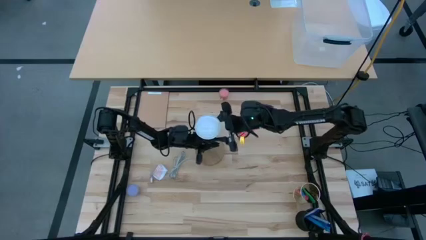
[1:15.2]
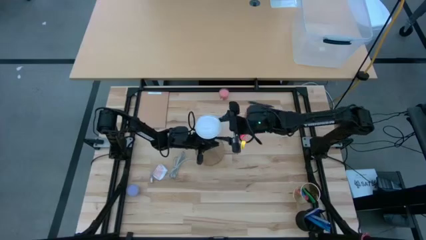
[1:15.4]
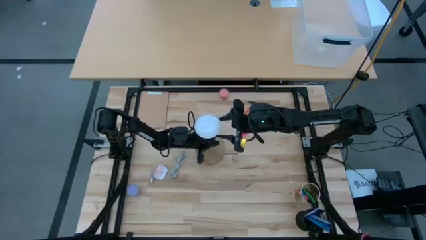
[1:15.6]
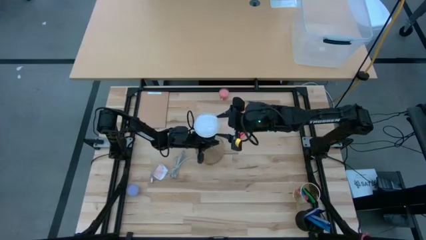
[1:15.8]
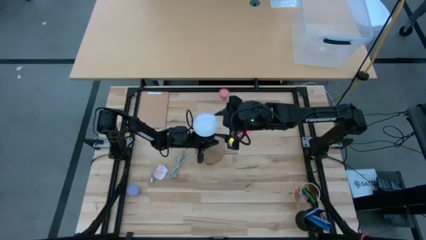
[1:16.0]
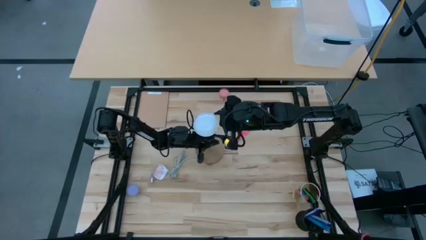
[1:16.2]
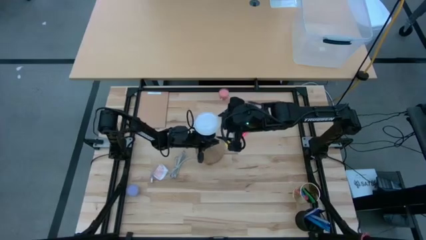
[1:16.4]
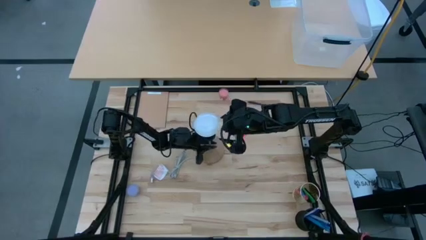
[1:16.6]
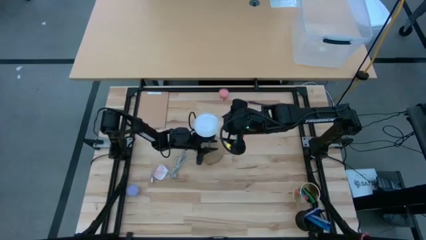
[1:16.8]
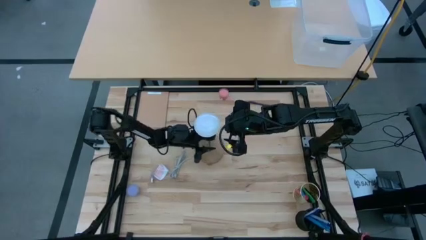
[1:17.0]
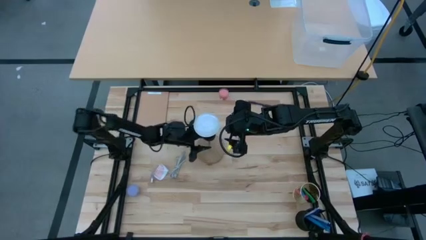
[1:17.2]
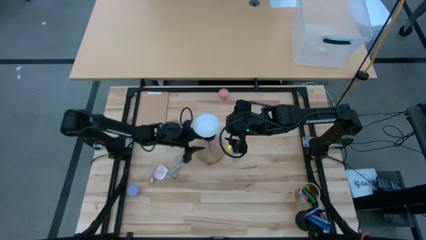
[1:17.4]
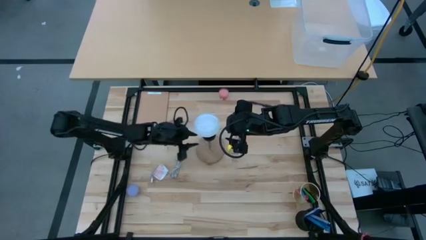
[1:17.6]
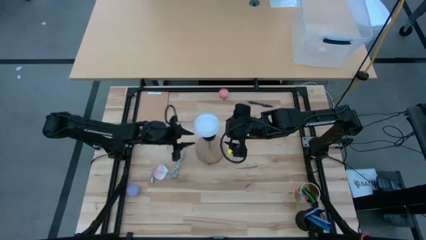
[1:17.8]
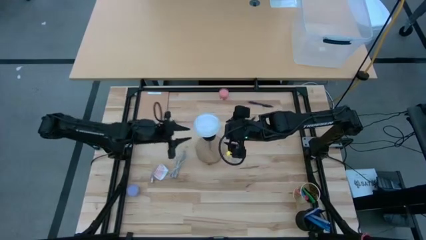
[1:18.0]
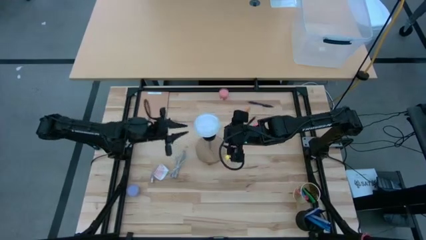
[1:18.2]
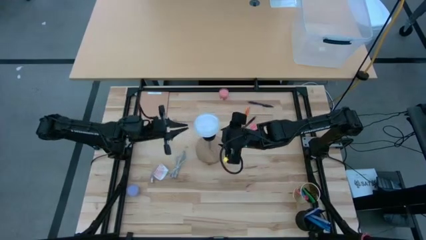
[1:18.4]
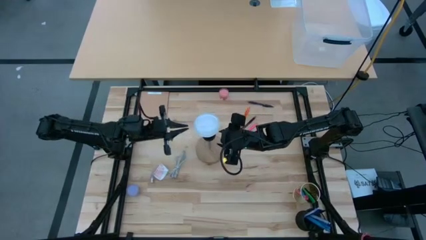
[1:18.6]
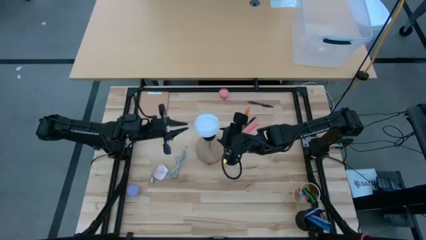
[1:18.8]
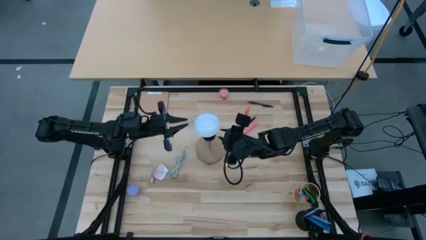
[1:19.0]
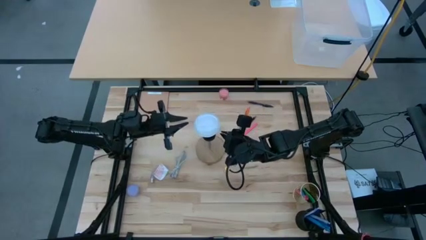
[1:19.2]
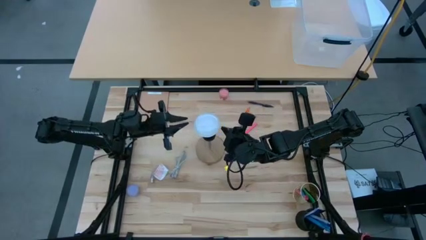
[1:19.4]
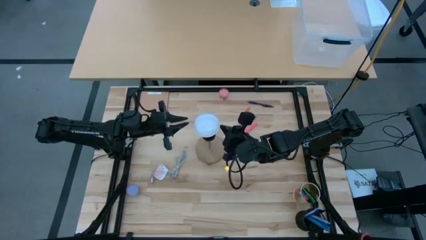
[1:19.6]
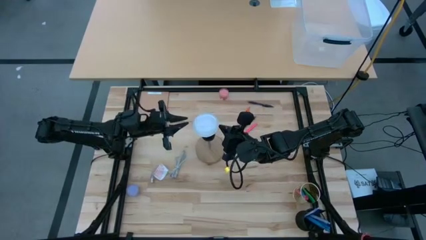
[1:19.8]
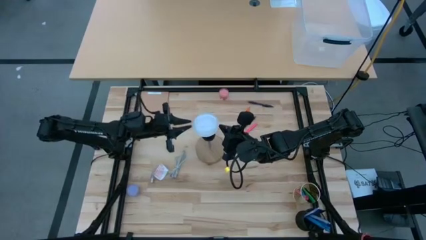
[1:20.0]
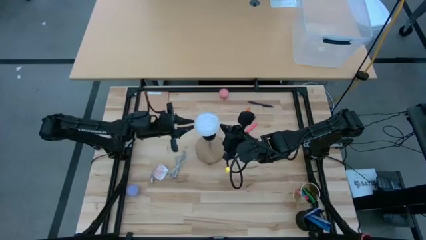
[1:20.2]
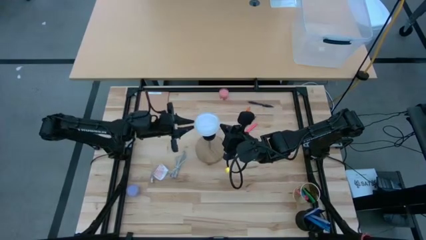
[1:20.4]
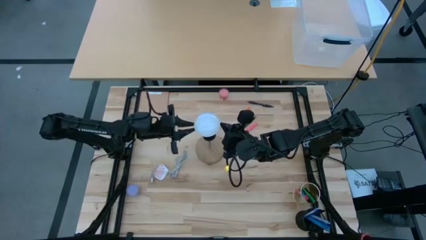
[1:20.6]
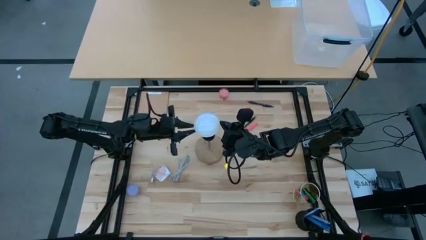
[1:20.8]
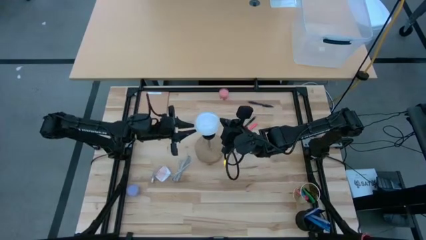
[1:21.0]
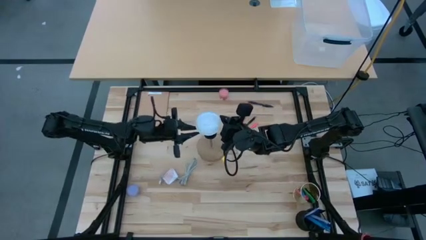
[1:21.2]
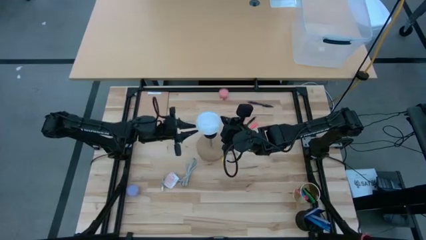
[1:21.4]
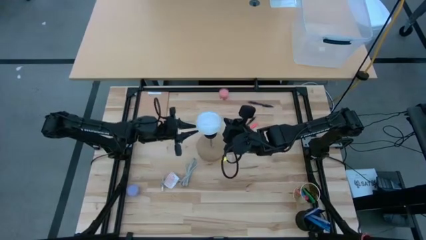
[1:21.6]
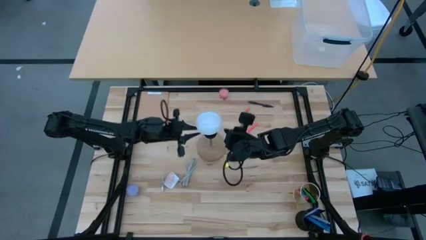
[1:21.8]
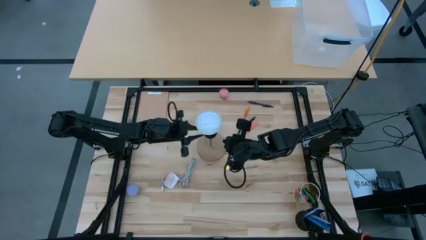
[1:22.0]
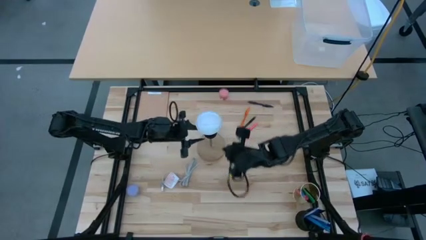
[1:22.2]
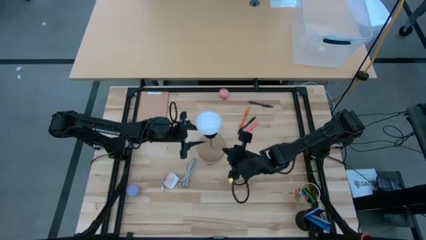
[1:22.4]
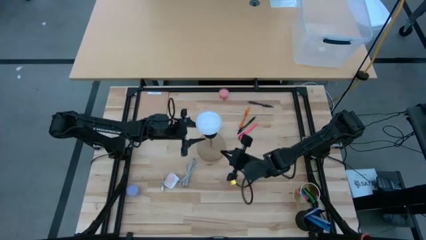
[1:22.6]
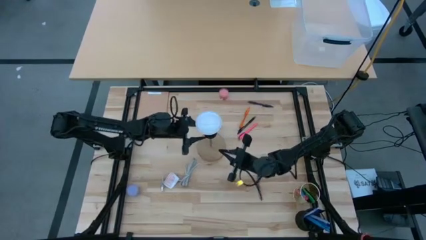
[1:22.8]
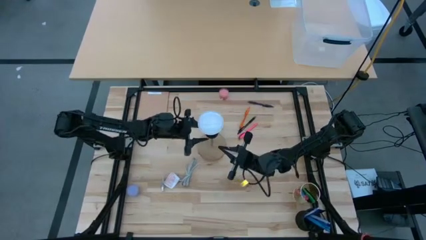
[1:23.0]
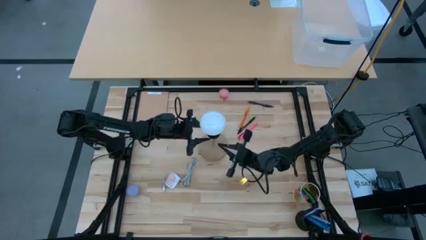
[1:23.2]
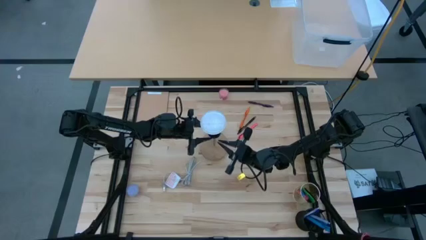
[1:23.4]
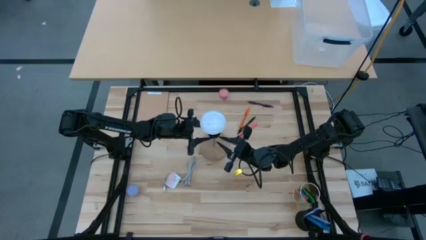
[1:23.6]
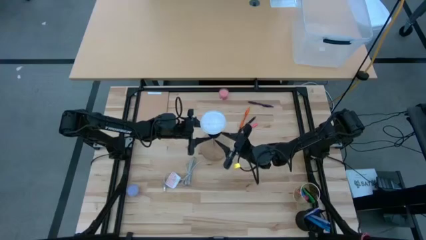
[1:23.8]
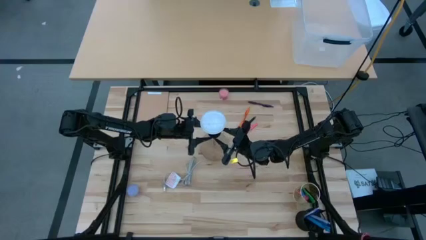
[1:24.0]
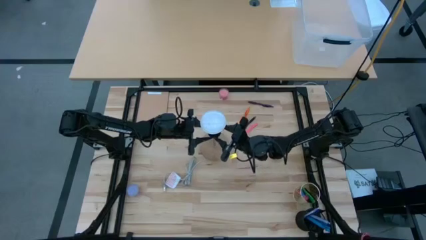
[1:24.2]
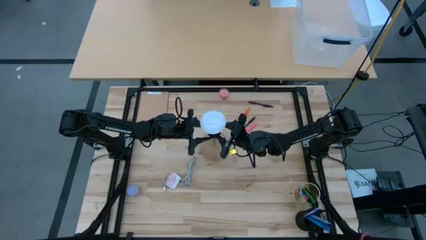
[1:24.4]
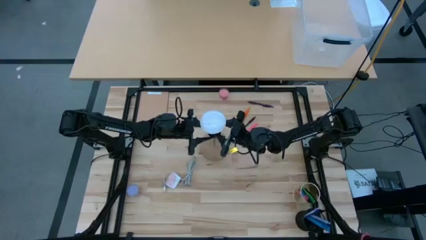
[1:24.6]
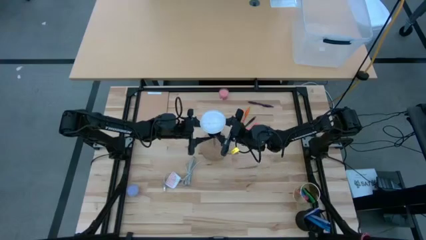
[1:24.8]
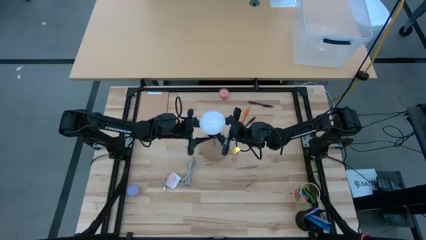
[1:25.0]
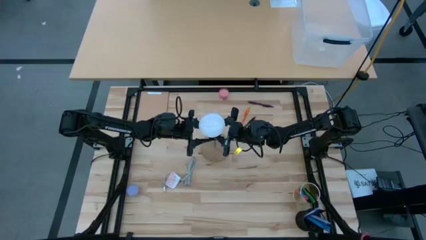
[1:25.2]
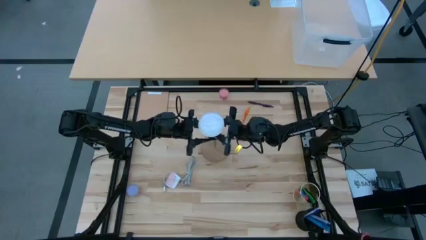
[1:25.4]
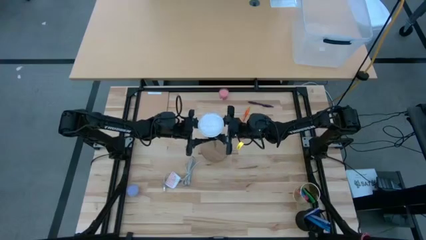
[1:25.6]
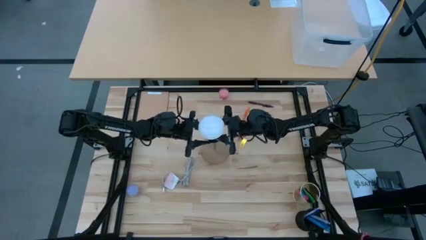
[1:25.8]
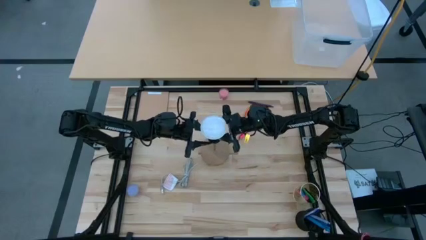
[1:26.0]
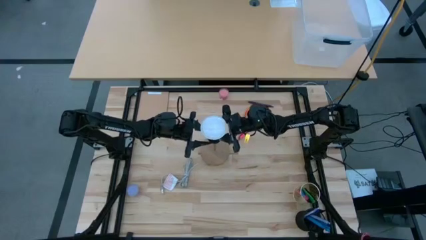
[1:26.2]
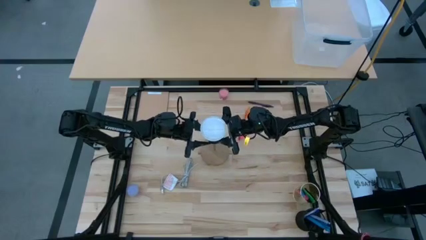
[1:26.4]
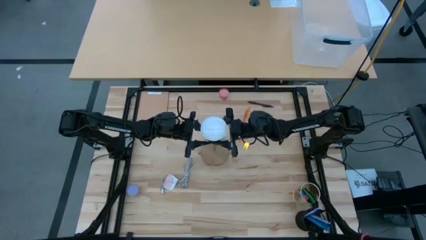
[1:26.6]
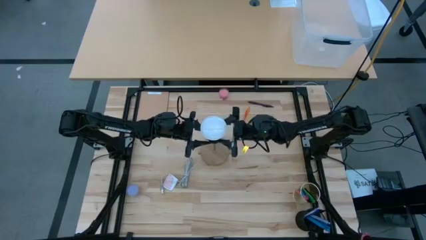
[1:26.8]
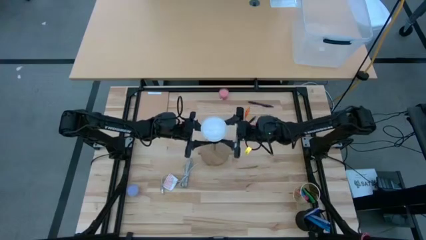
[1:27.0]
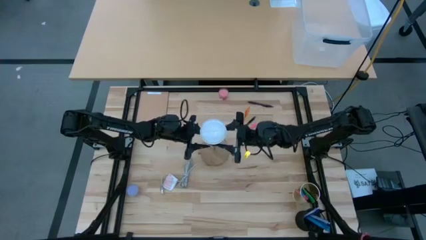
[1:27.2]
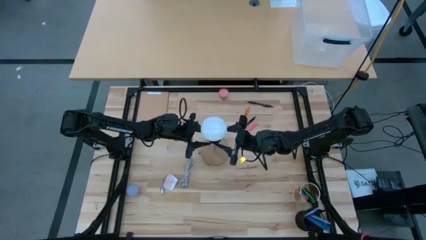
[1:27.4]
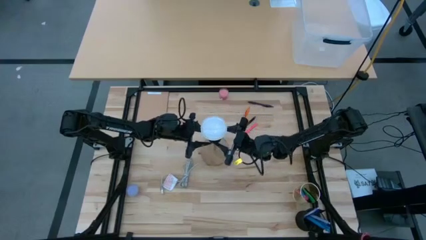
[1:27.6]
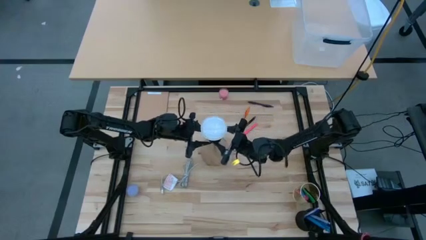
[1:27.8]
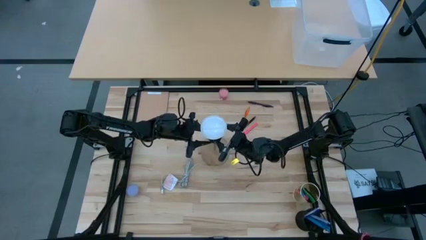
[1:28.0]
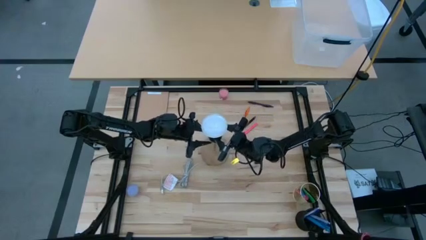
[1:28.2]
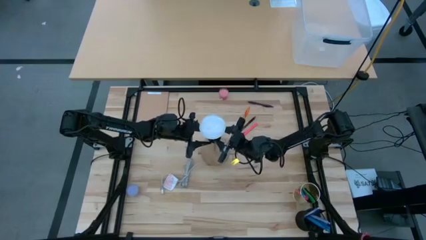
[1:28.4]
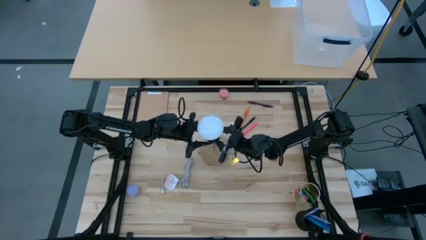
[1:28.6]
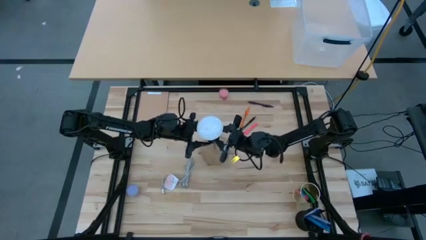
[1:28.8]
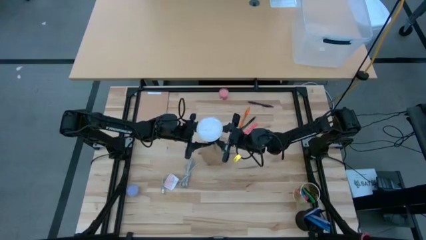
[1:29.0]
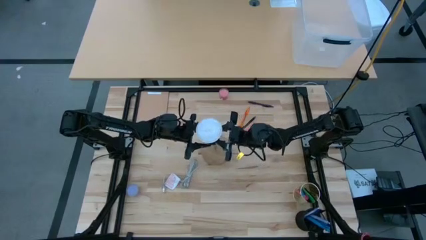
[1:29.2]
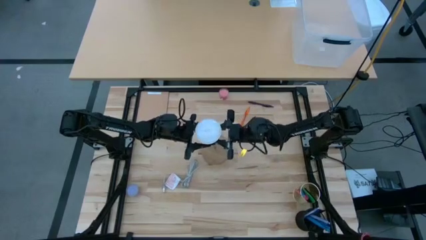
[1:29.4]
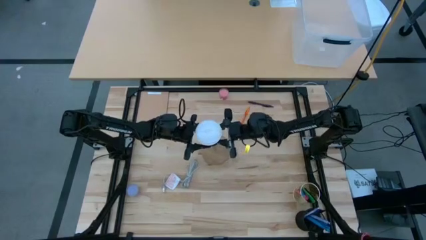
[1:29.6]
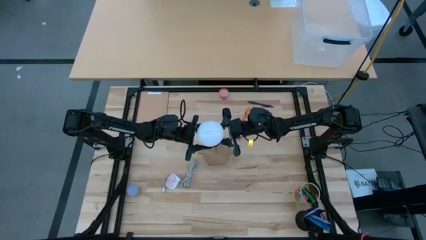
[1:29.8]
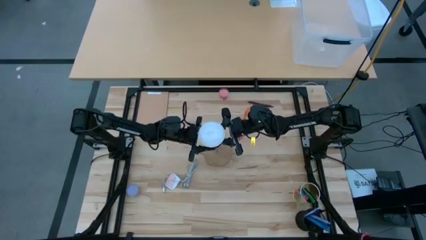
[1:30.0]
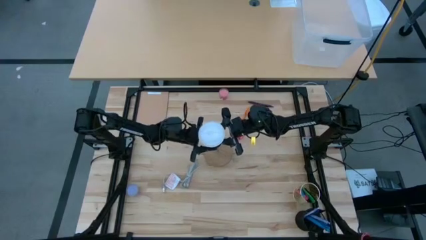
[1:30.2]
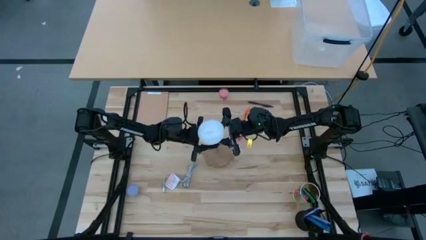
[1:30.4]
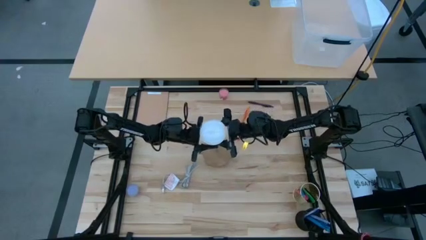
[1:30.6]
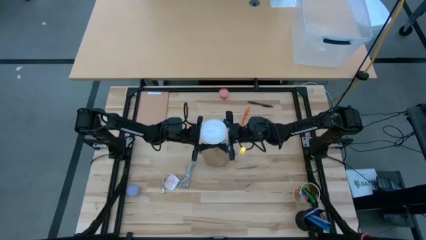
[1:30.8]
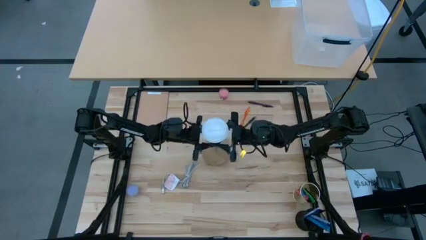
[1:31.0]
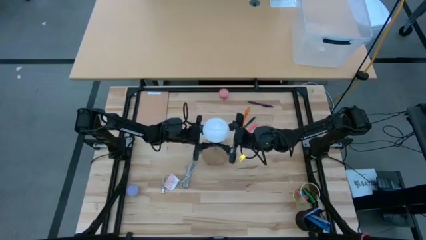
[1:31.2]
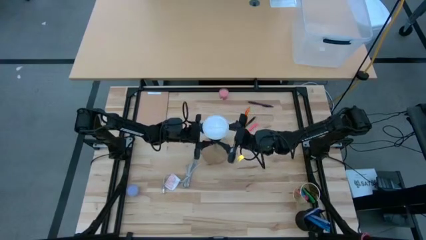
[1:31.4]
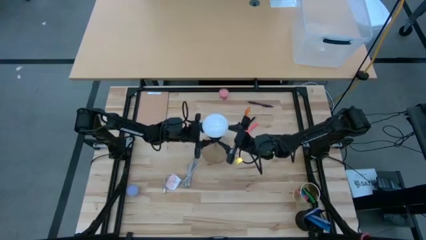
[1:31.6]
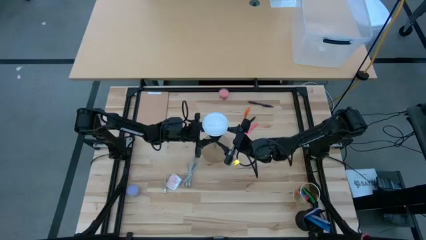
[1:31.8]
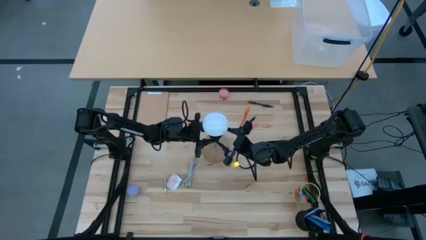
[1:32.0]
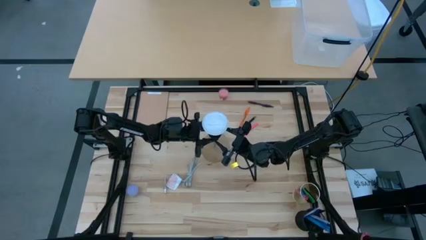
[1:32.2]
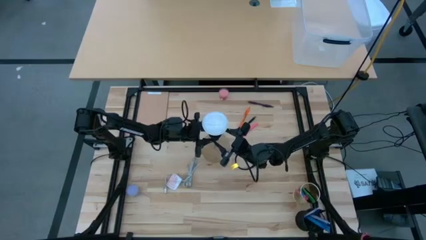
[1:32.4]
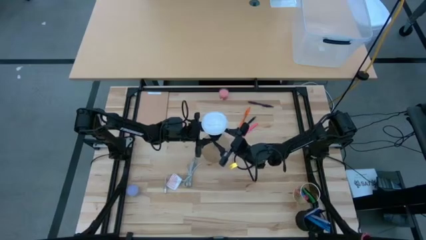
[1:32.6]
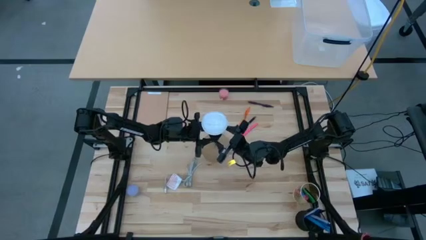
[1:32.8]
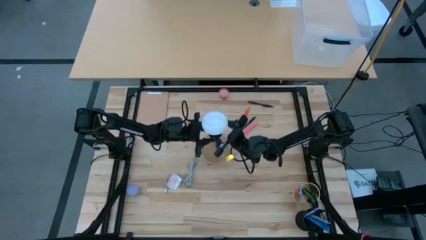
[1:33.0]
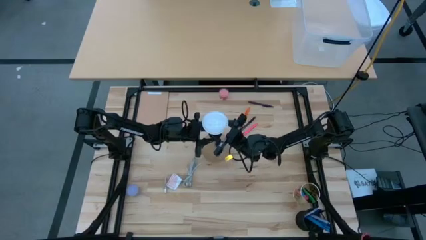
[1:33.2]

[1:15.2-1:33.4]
Task: Screw lightbulb
Remove the white lightbulb from the desk lamp
